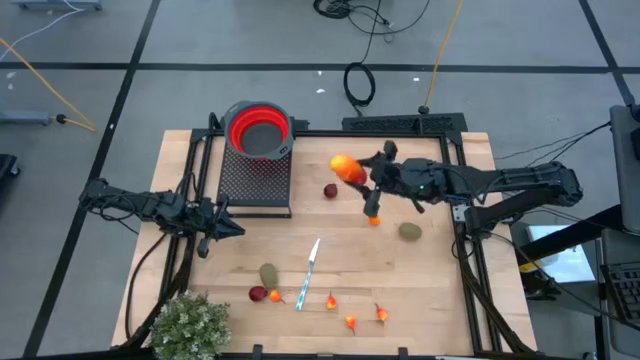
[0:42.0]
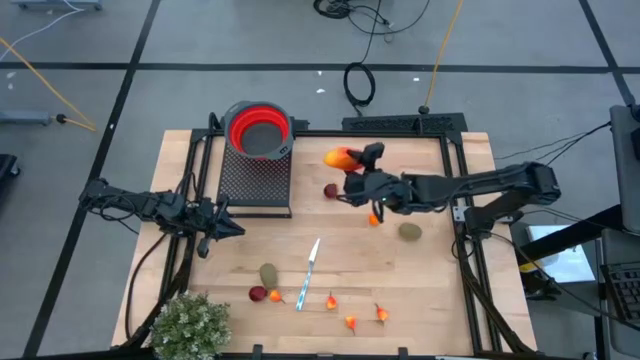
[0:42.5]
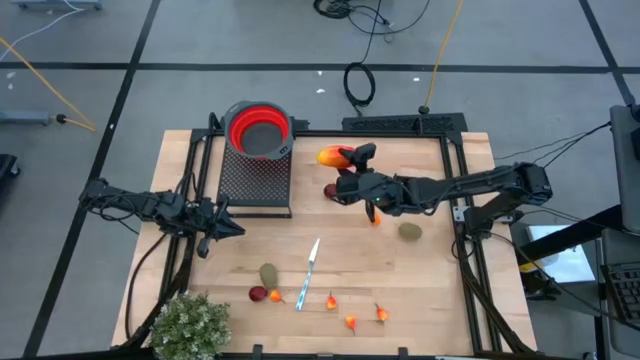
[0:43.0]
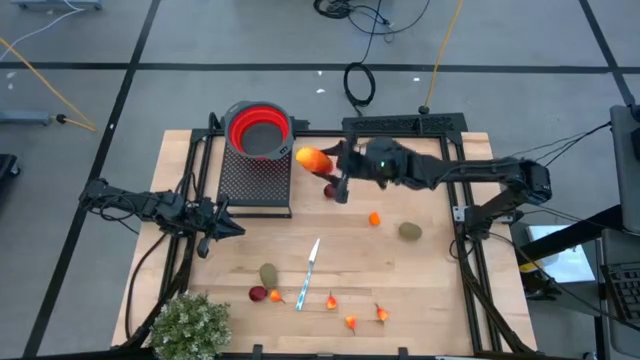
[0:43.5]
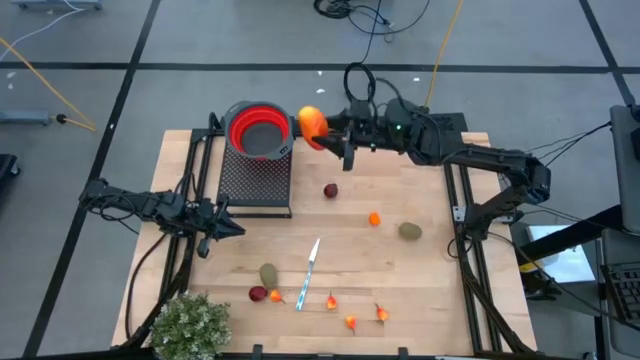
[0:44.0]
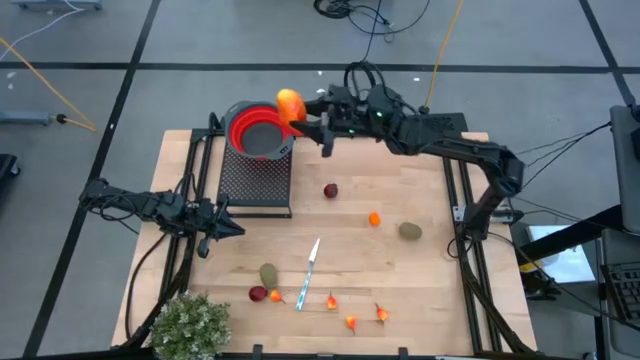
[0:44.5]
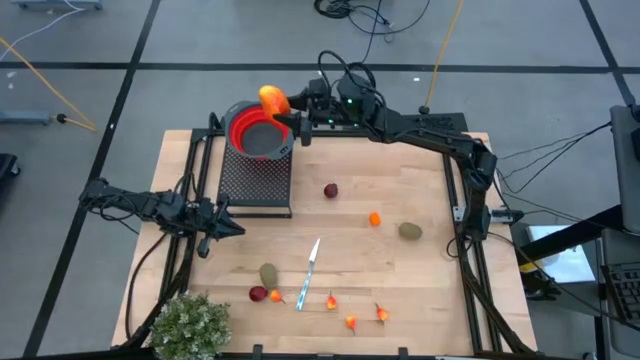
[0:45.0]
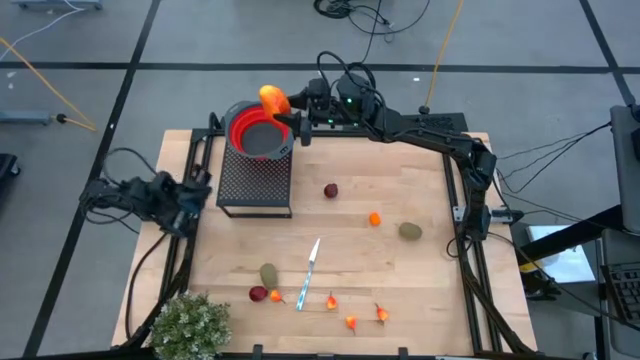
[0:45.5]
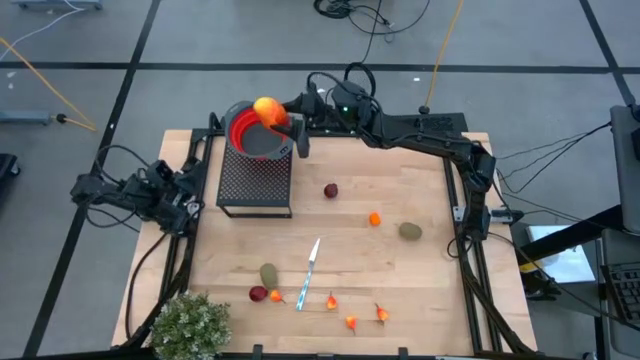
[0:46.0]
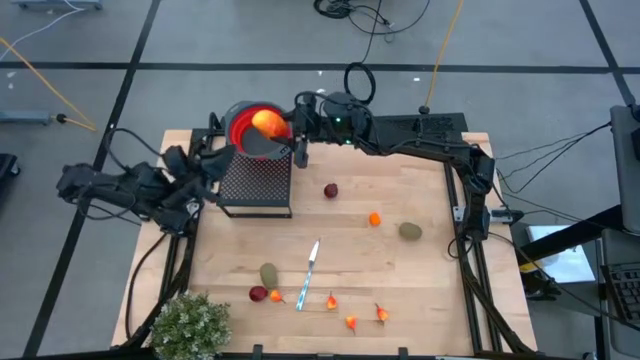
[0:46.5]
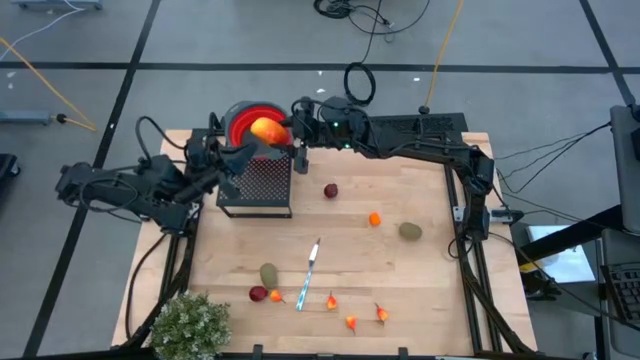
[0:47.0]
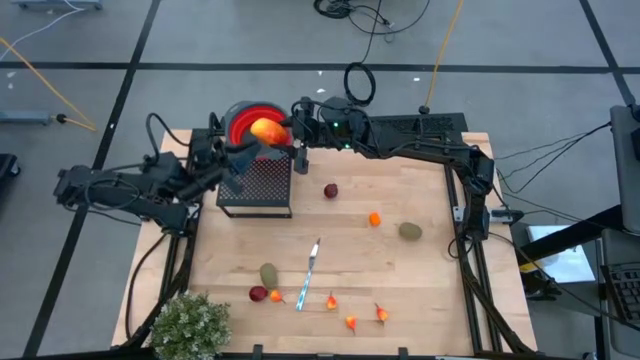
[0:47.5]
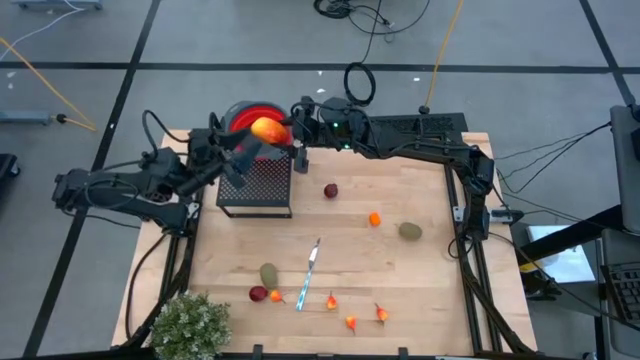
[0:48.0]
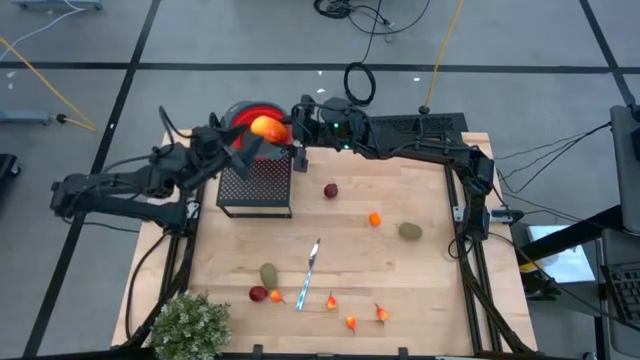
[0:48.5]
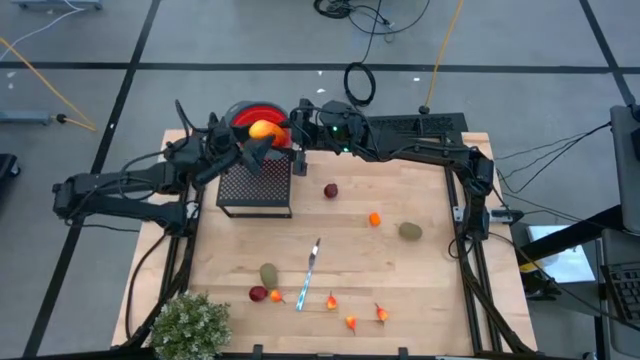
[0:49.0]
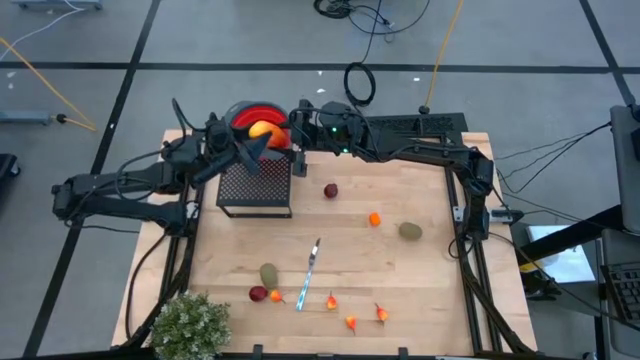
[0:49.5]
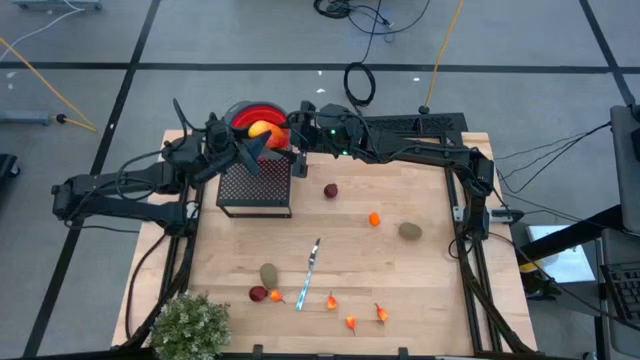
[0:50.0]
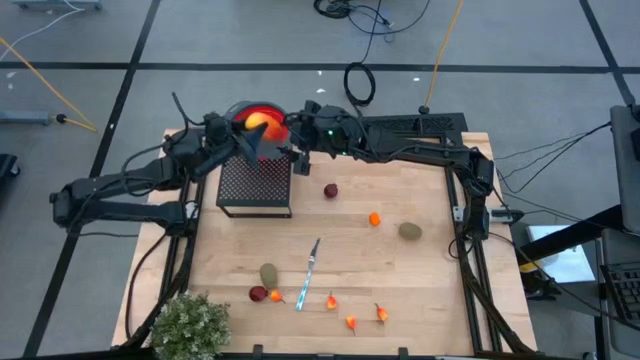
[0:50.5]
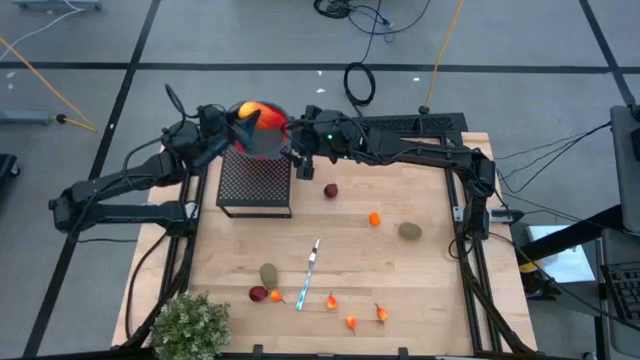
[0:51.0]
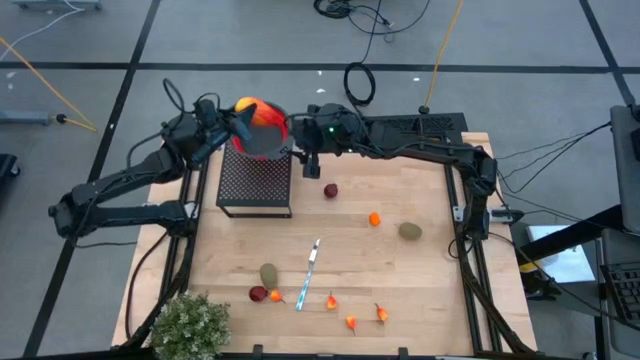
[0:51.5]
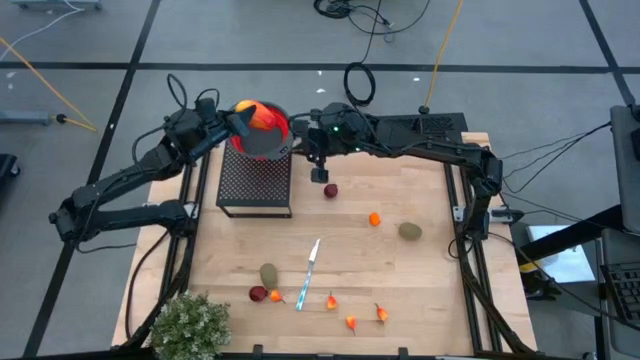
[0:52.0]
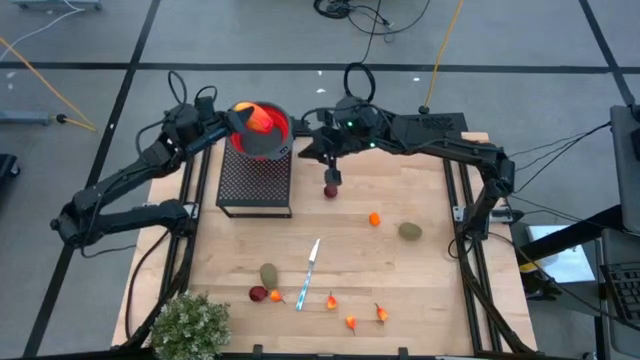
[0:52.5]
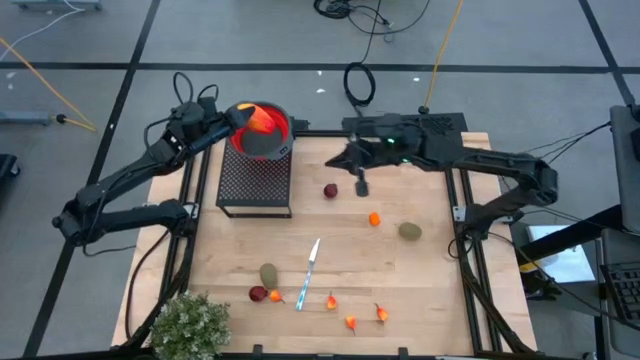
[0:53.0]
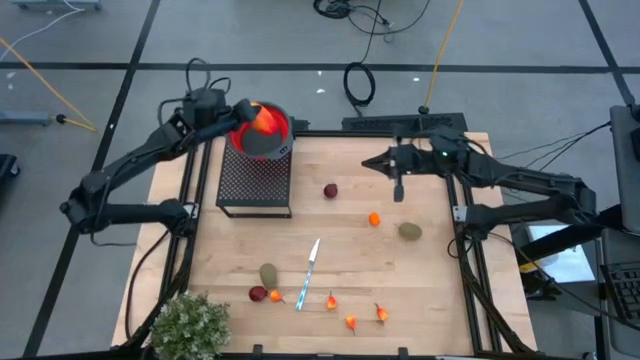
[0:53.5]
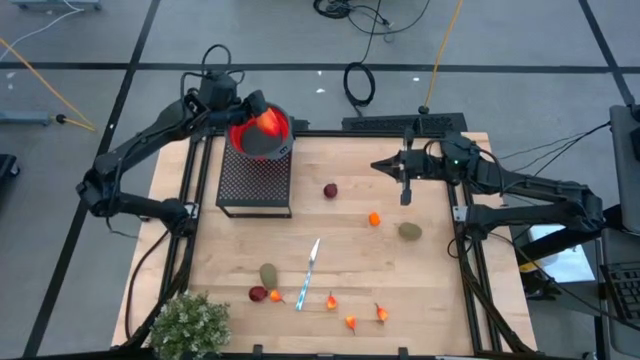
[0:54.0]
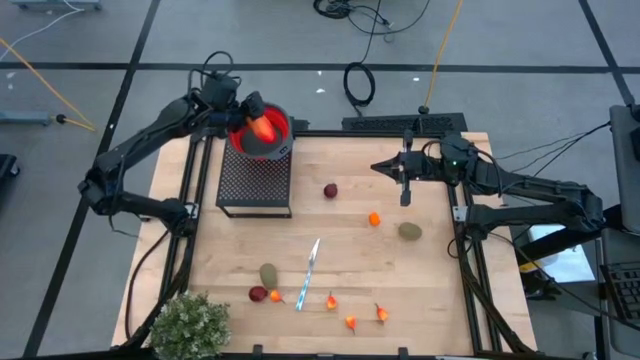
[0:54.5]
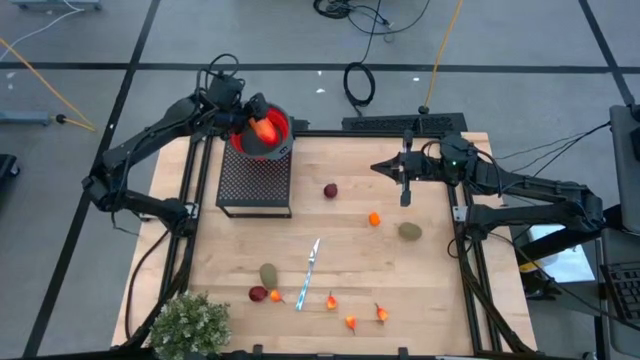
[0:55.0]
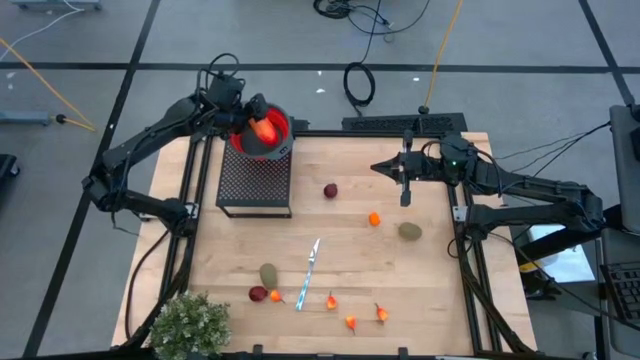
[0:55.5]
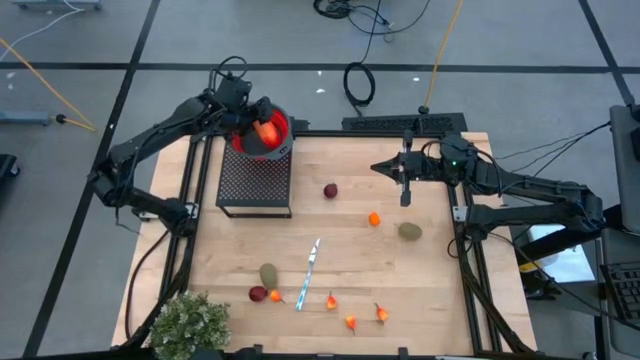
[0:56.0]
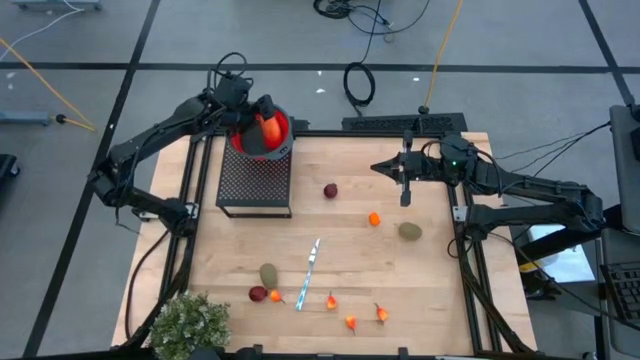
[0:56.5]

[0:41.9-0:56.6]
Task: Pick & Place Fruit
Put the orange mango into the red strainer bowl on the shelf

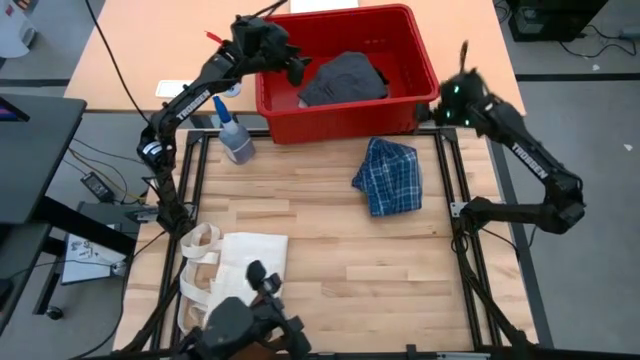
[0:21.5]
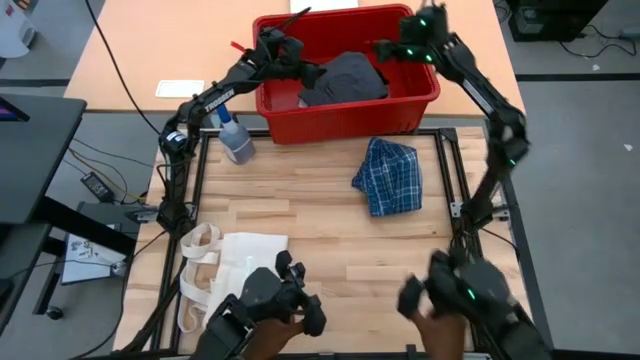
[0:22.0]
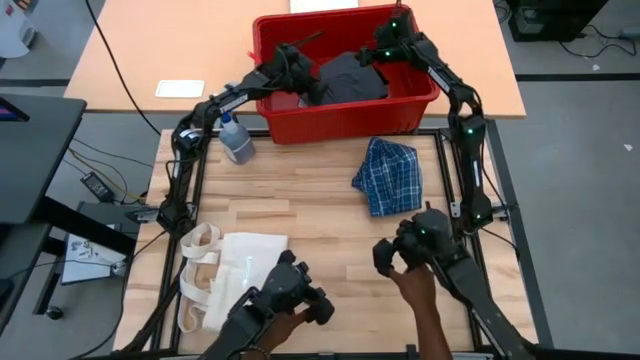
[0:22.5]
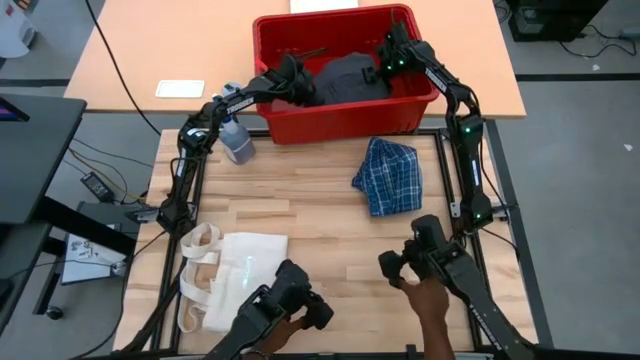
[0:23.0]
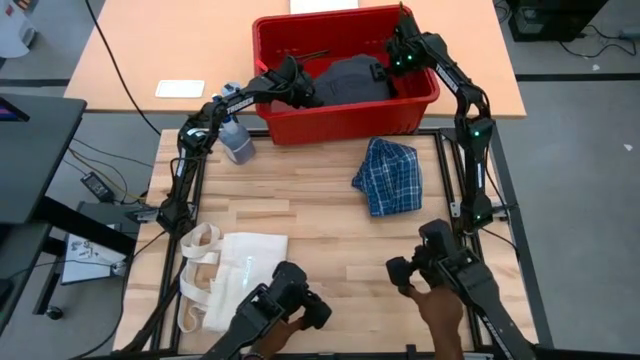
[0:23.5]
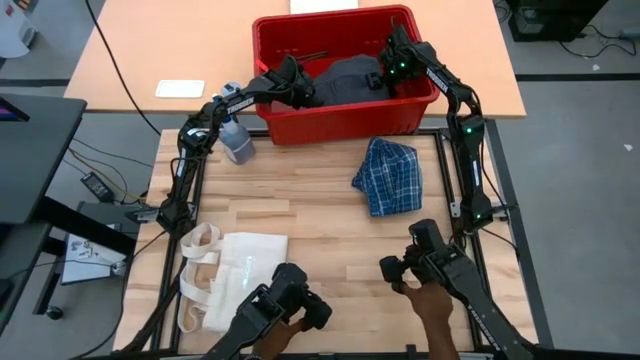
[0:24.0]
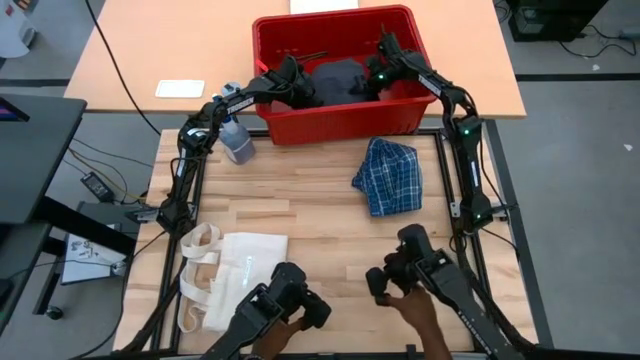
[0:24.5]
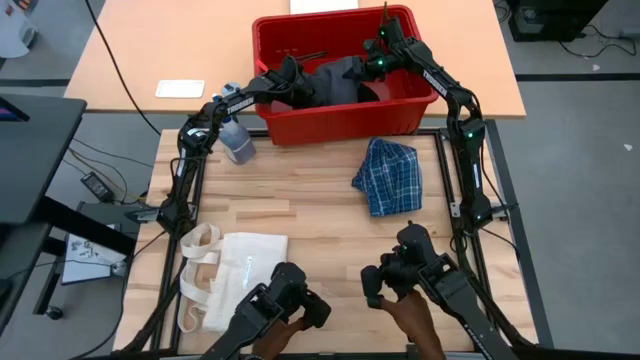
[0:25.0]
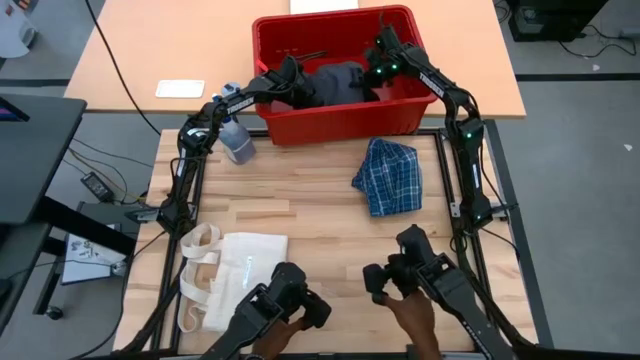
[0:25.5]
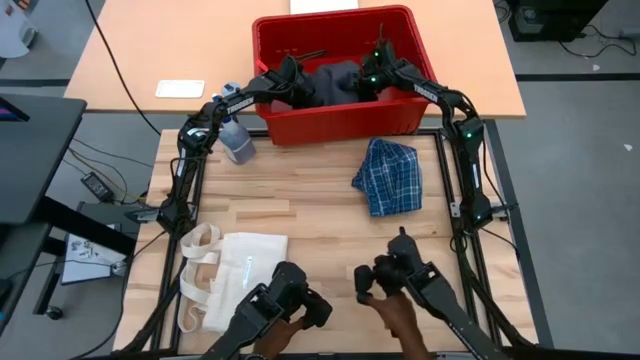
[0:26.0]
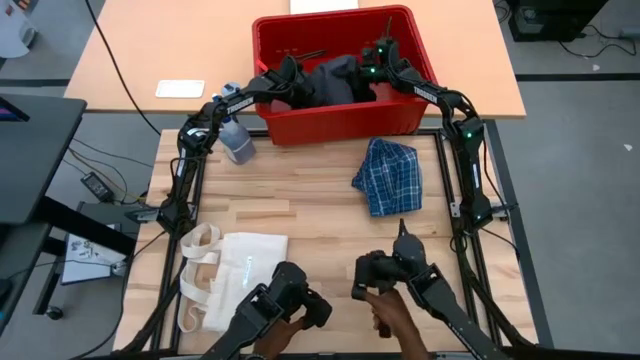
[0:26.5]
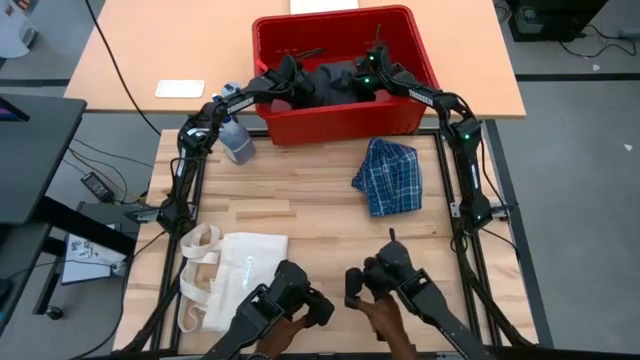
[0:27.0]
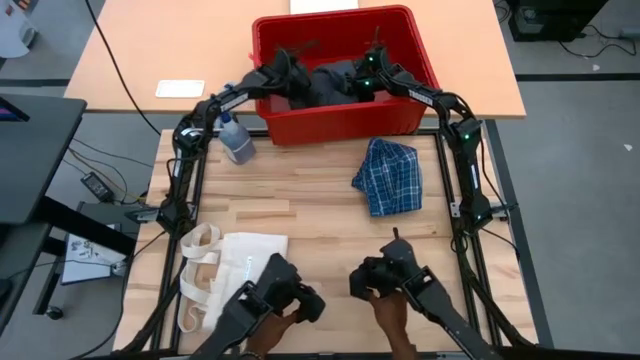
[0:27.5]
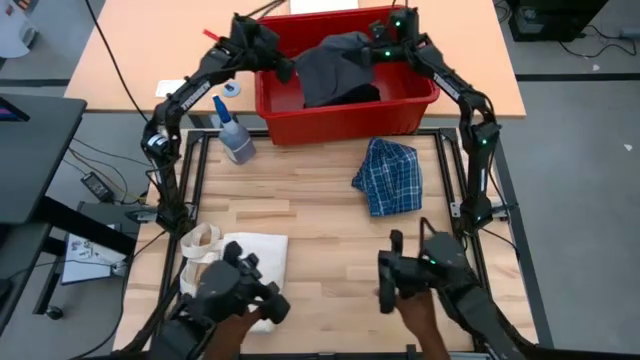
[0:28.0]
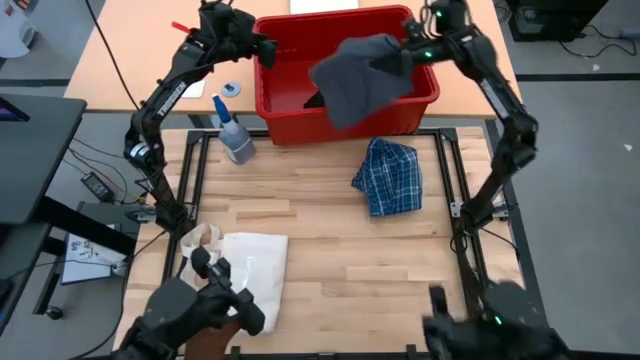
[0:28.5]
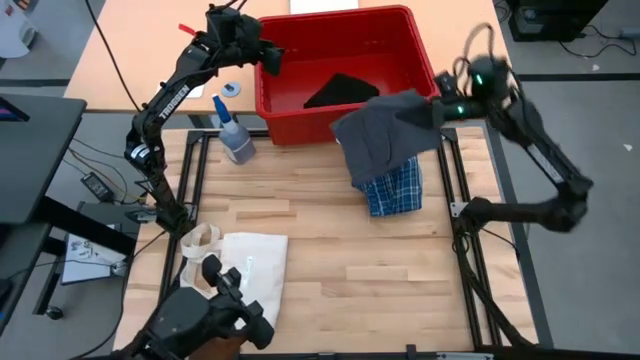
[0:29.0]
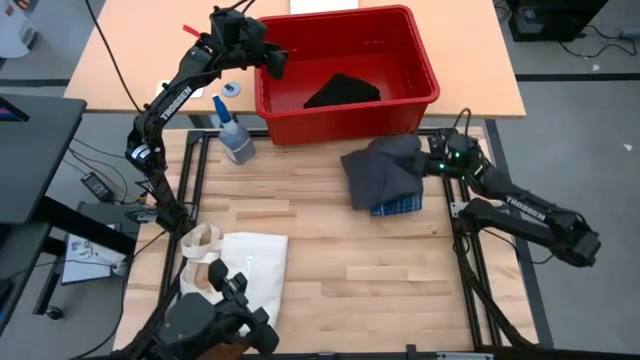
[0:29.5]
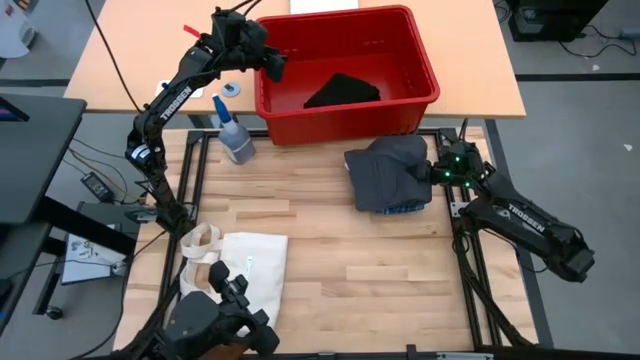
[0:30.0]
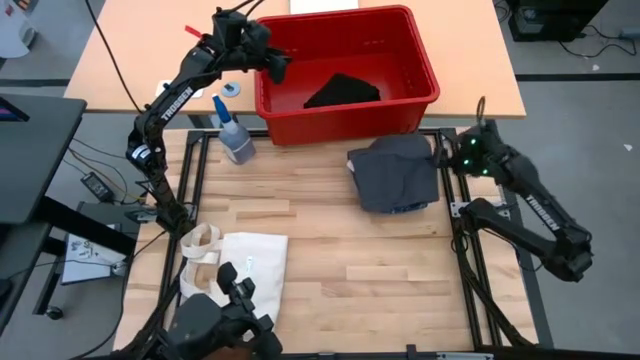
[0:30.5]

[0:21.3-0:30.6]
Task: Fold laundry
Remove the folded gray pants from the red bin
